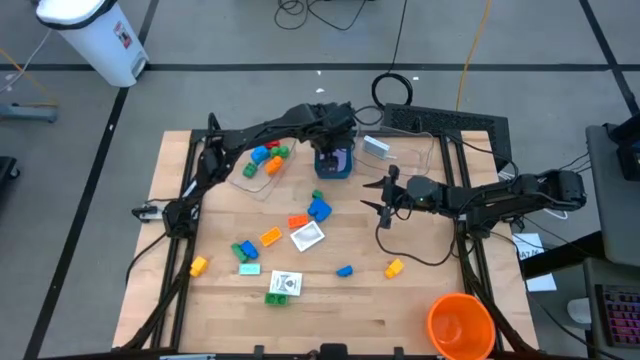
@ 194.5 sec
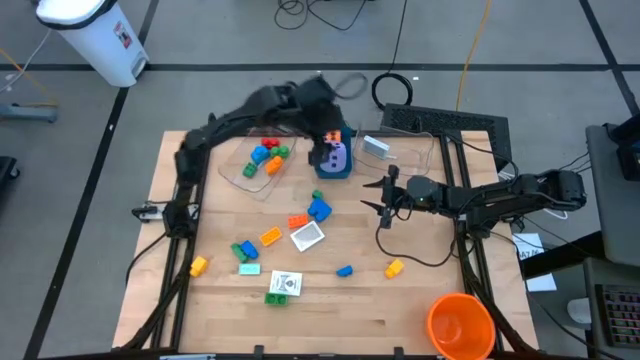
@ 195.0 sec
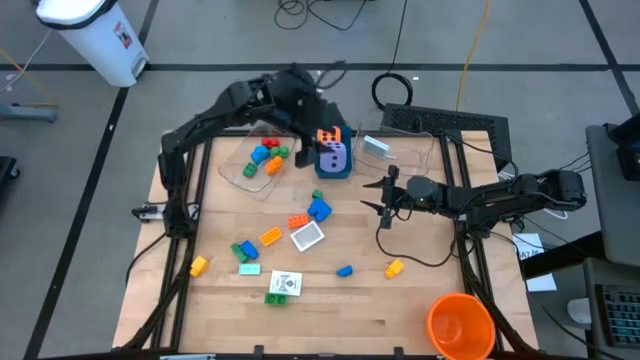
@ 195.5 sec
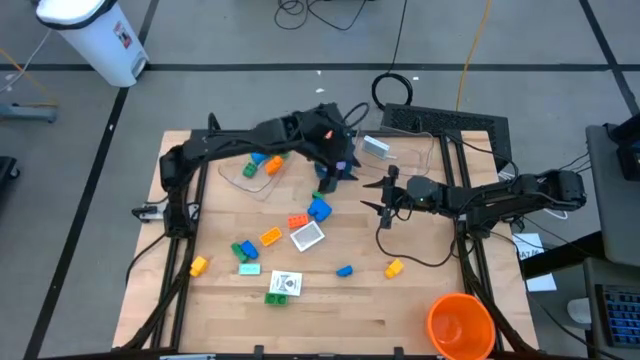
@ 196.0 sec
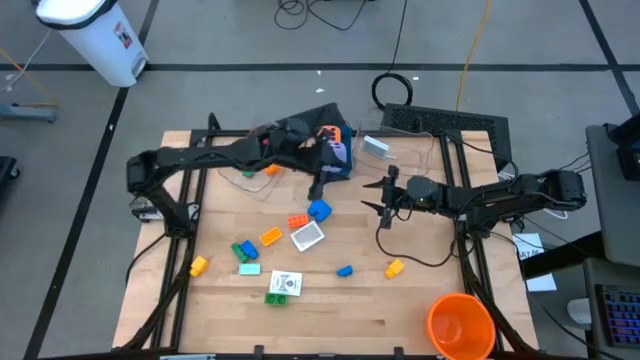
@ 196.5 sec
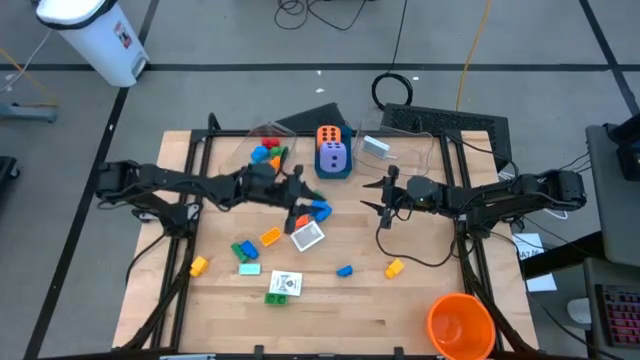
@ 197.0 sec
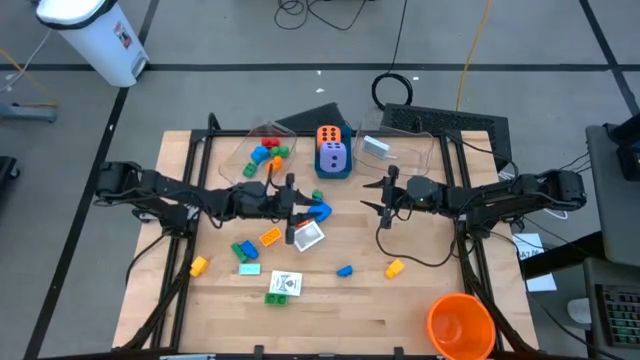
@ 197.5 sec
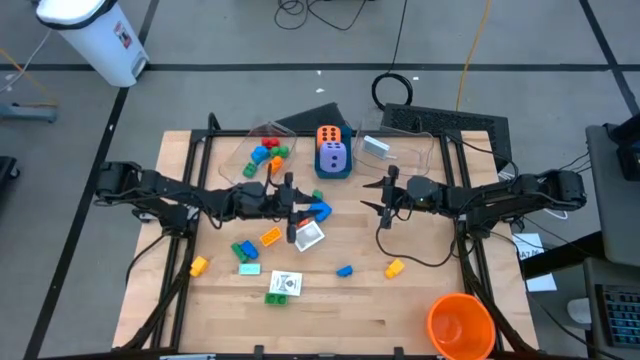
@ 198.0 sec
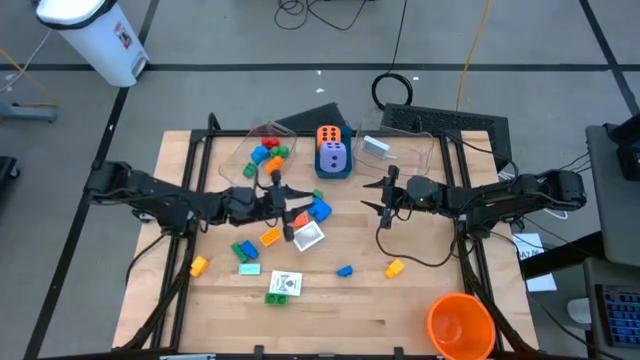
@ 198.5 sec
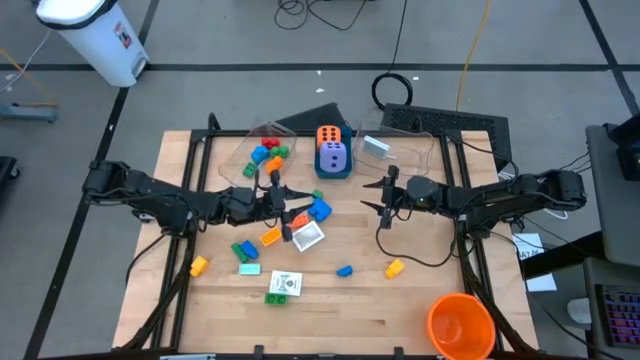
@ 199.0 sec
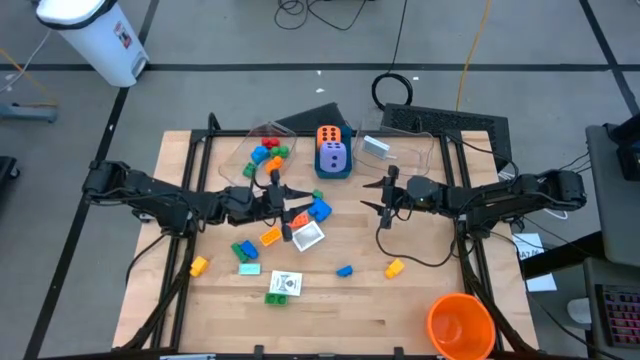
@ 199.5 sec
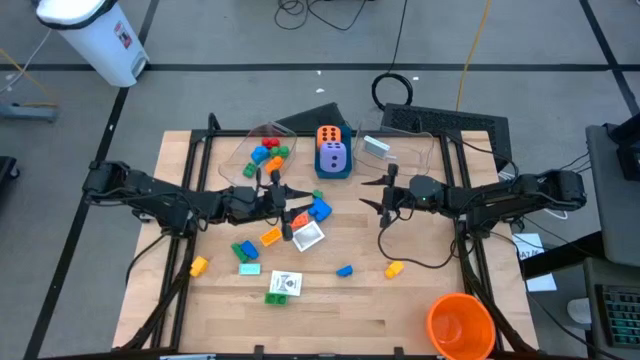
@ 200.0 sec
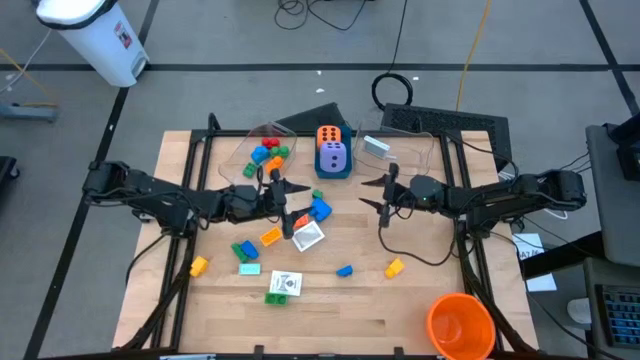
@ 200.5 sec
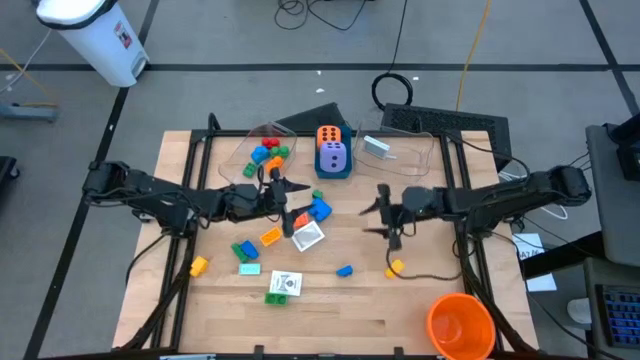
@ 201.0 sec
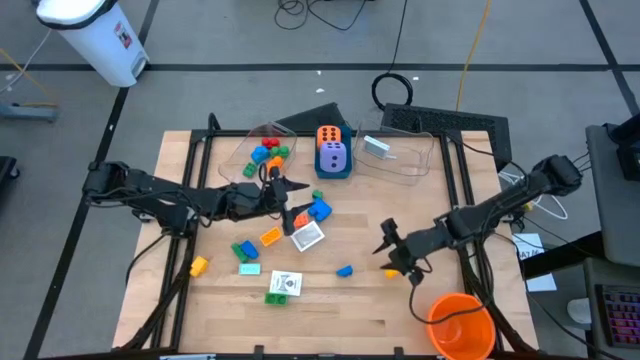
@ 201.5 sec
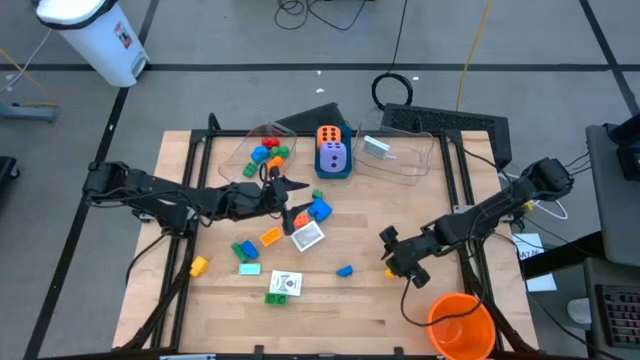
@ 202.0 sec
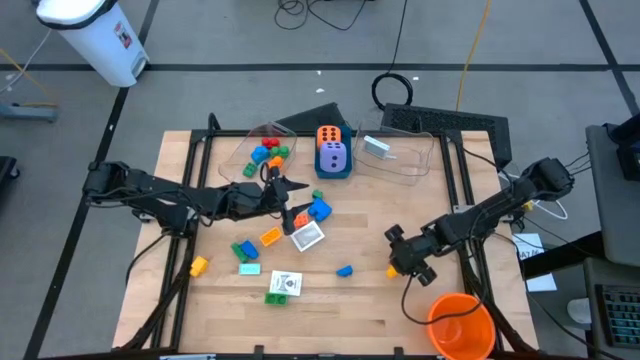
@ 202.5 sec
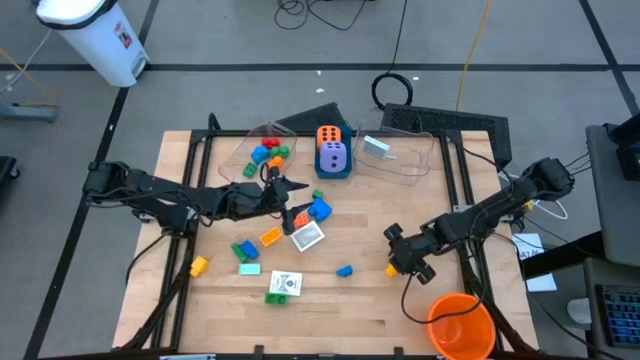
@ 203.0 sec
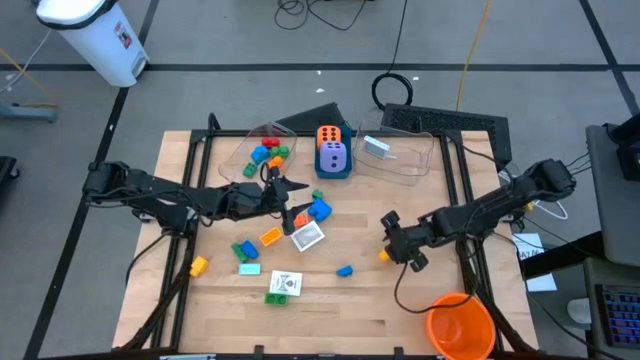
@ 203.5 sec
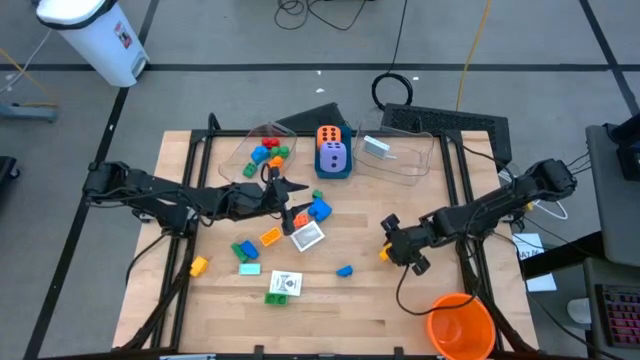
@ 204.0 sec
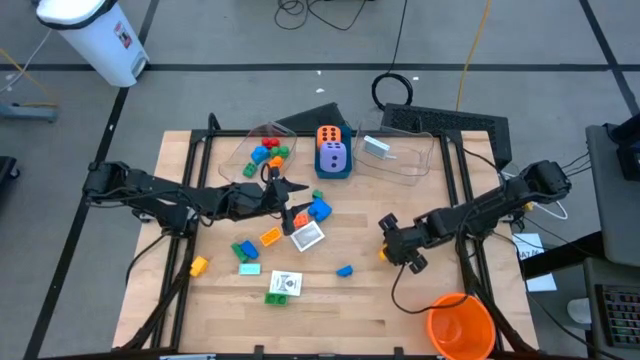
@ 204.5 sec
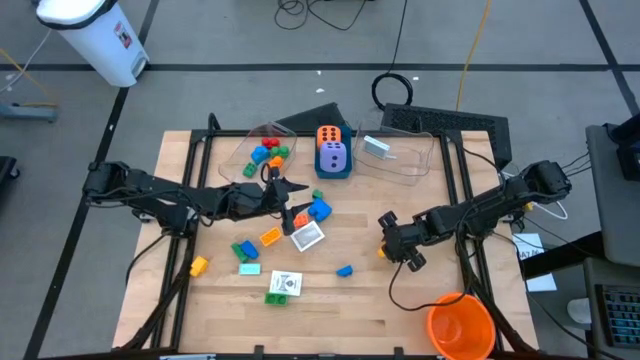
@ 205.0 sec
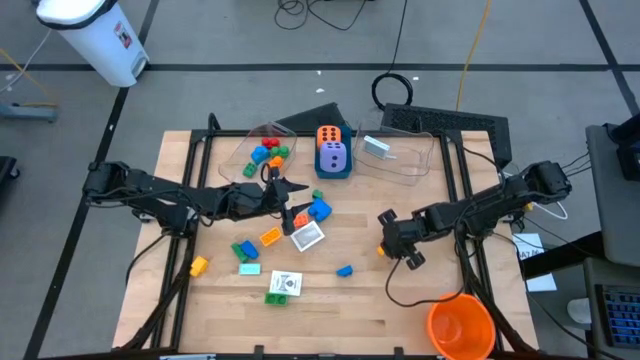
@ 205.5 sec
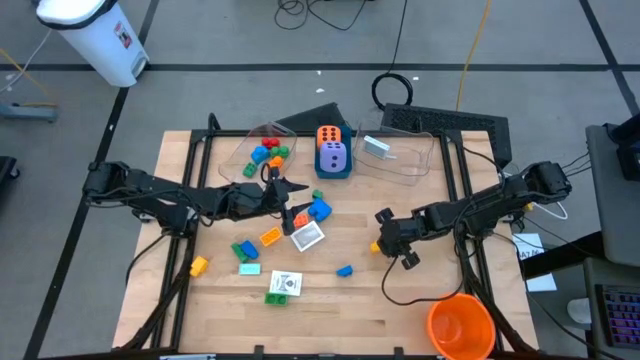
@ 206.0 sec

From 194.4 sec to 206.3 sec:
Task: Pick & Place Toys
Put the yellow game piece into the left transparent bin

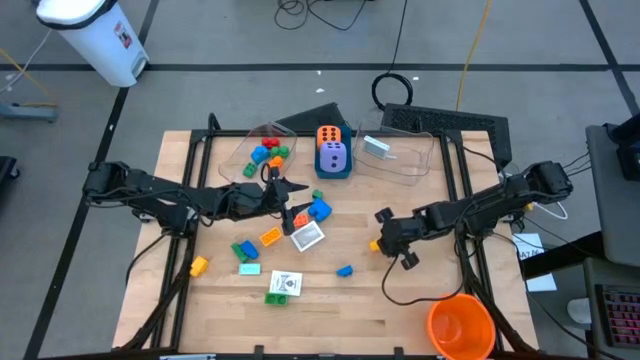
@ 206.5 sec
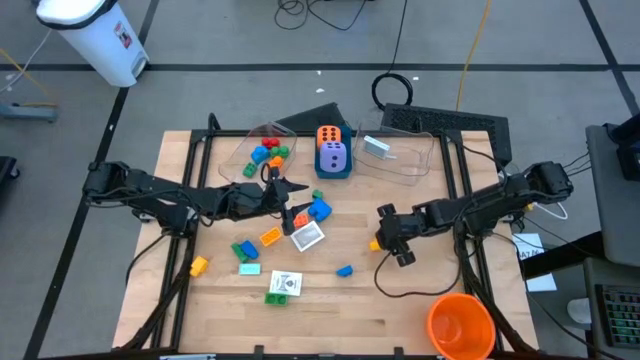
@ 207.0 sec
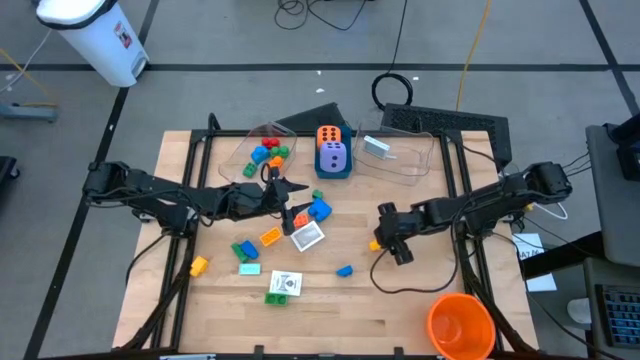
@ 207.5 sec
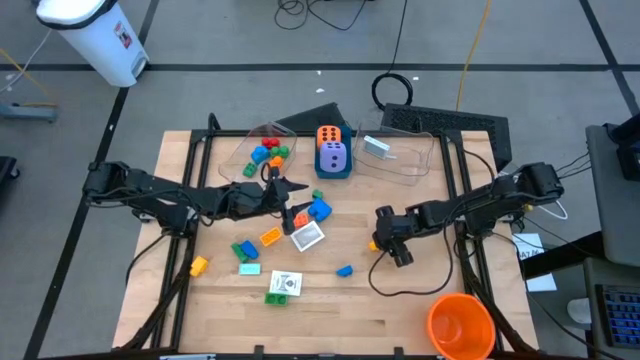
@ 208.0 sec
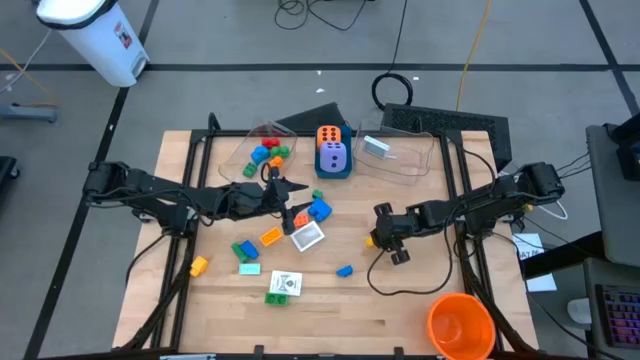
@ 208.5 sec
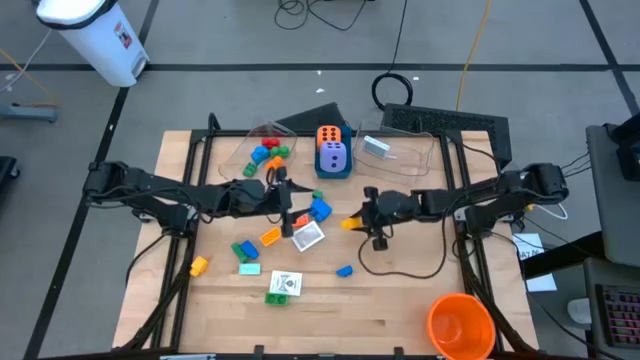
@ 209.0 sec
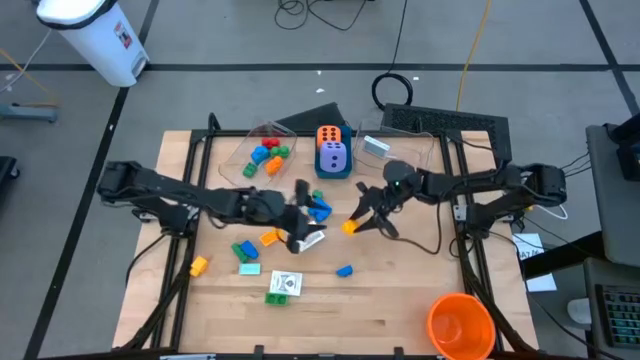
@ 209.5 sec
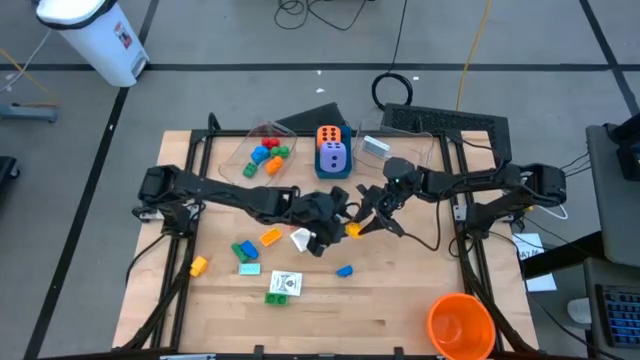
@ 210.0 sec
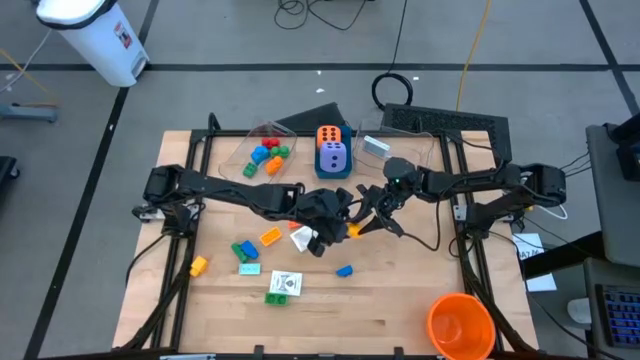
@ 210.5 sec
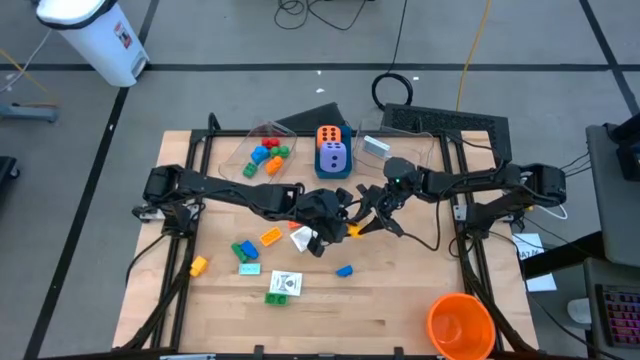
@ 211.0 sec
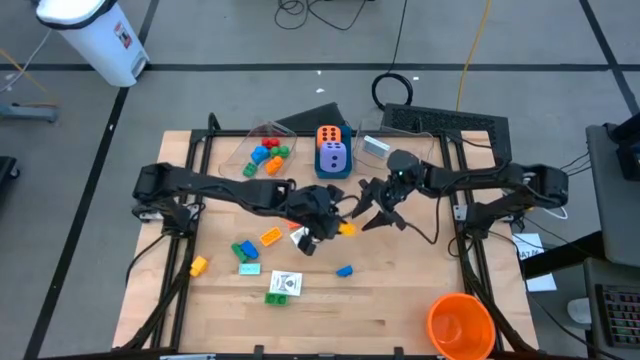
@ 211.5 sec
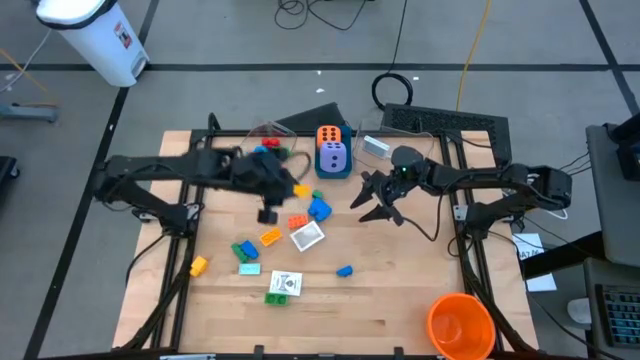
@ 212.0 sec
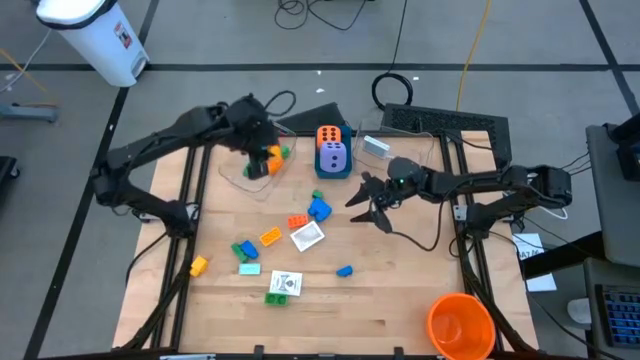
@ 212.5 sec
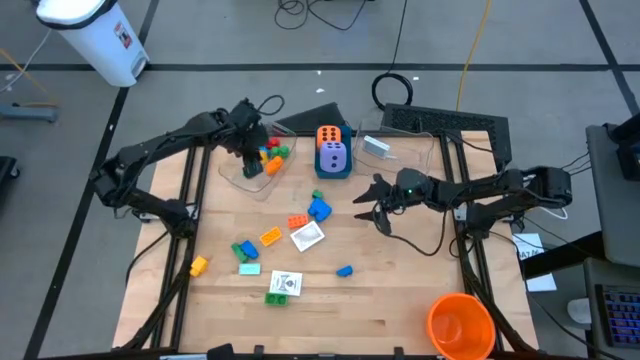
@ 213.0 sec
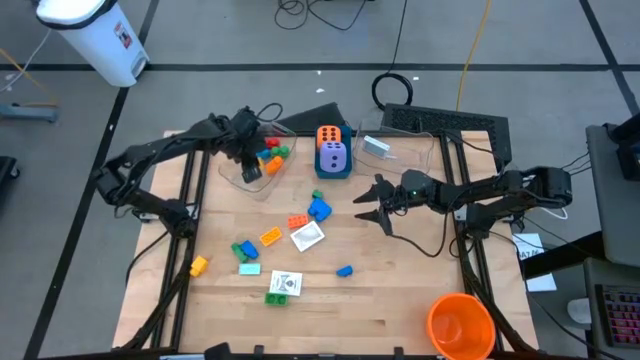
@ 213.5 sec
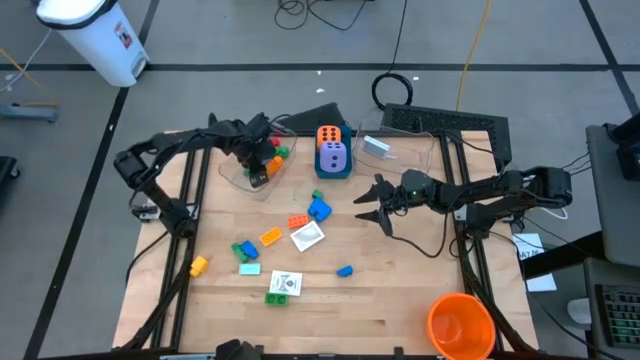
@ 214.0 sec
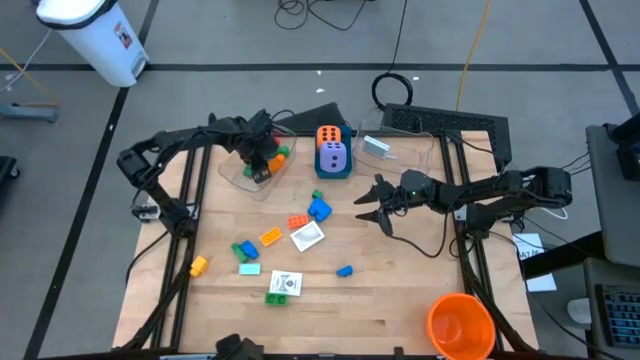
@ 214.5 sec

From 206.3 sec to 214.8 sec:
Put the yellow game piece into the left transparent bin

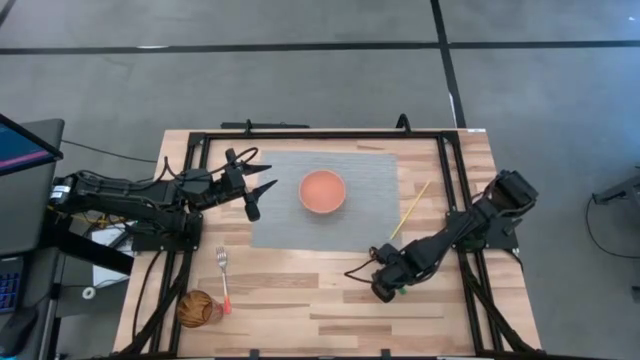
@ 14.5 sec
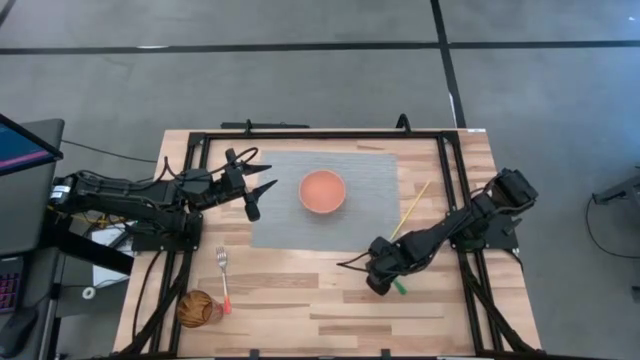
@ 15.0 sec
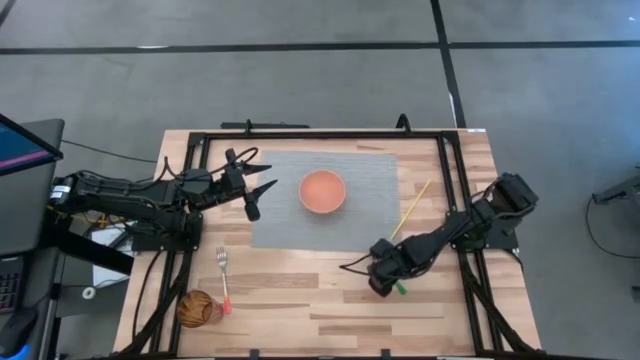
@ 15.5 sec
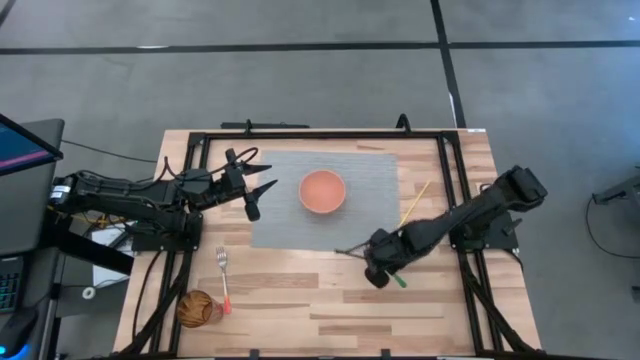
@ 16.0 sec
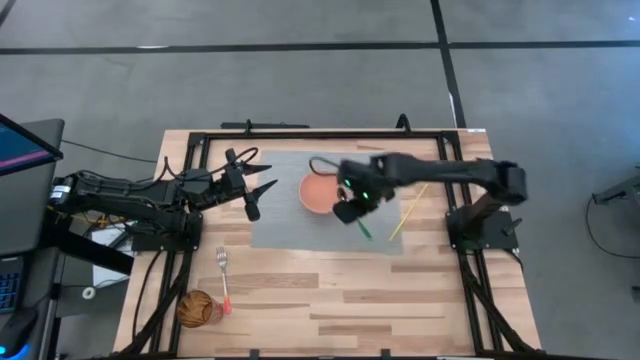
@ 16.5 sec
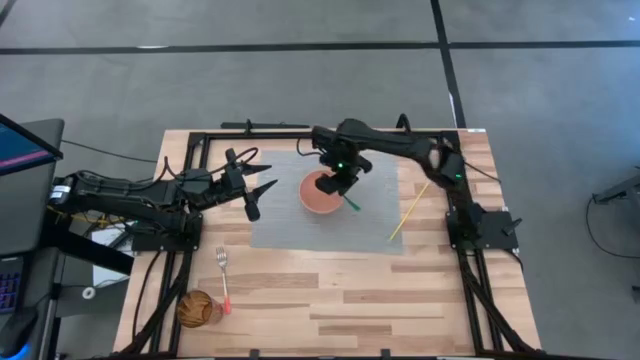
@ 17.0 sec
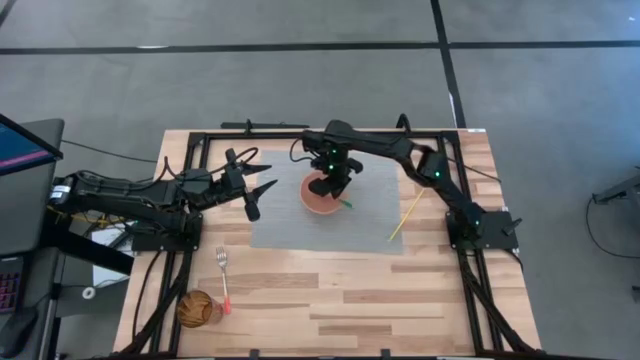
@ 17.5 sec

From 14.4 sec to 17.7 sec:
Task: Pick & Place Utensil
Put the green spoon into the orange bowl on the gray mat
